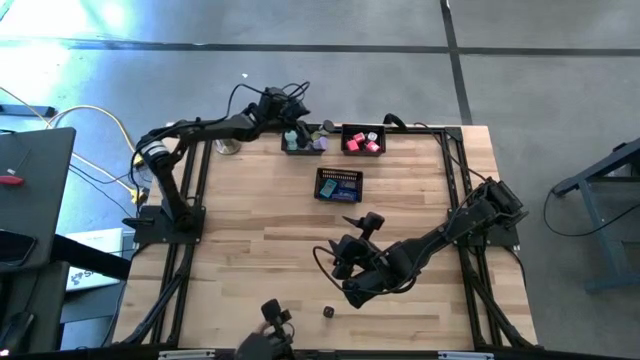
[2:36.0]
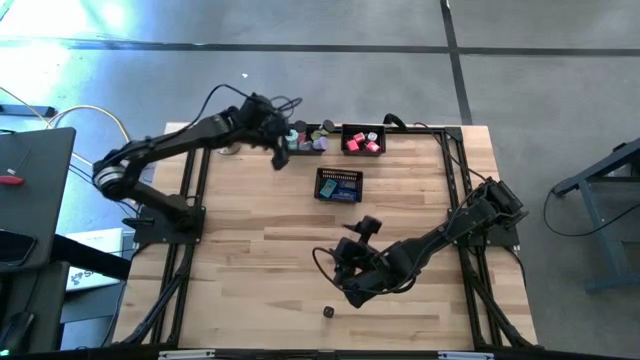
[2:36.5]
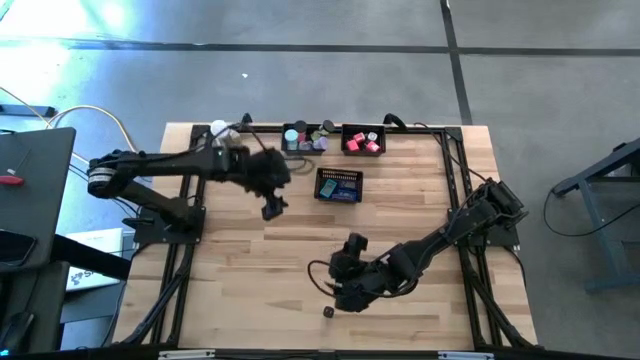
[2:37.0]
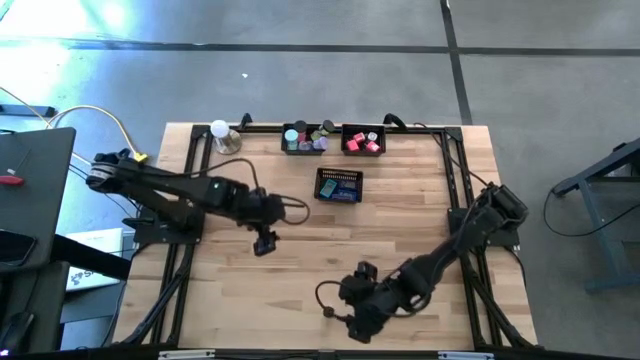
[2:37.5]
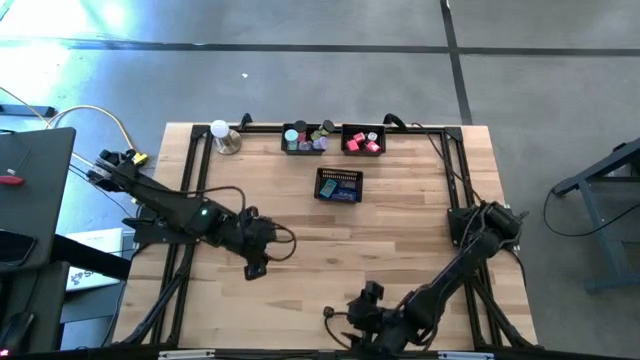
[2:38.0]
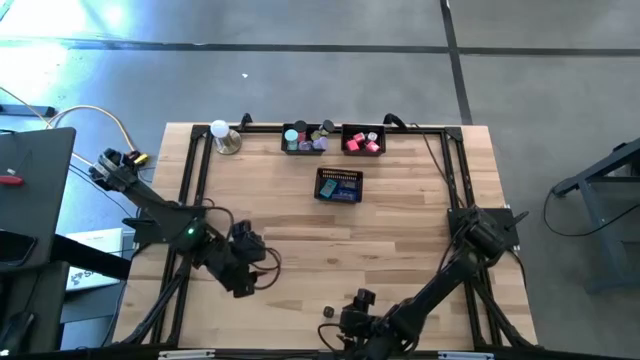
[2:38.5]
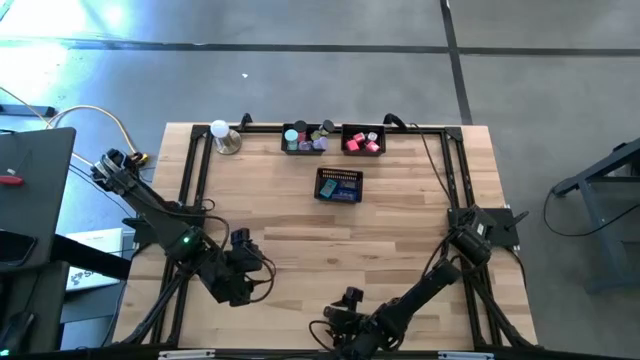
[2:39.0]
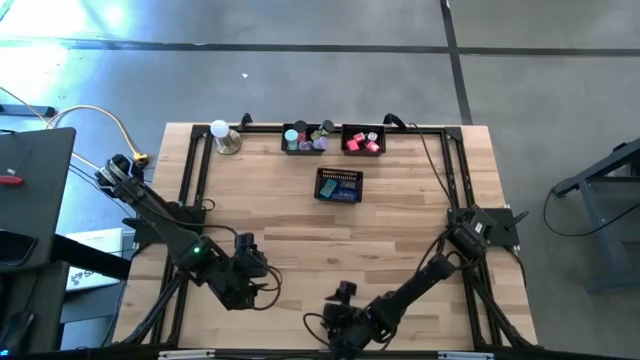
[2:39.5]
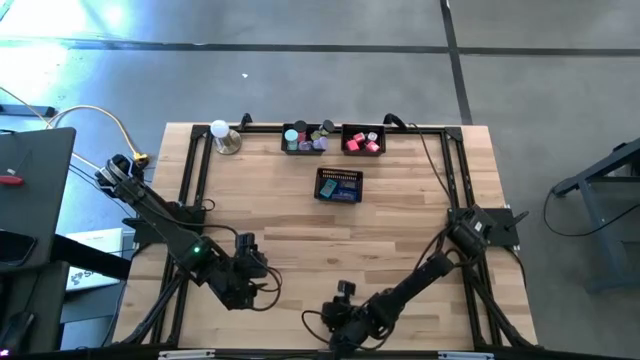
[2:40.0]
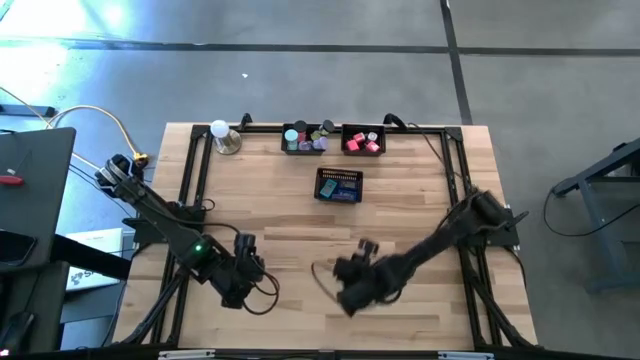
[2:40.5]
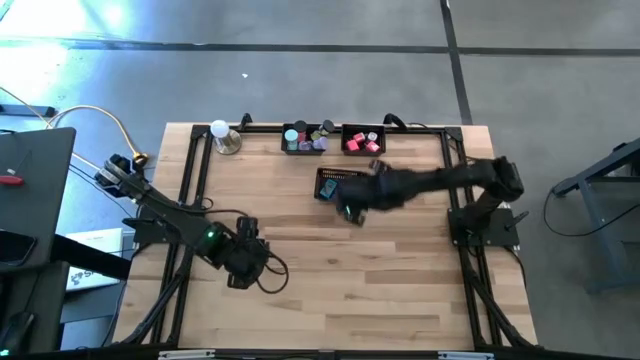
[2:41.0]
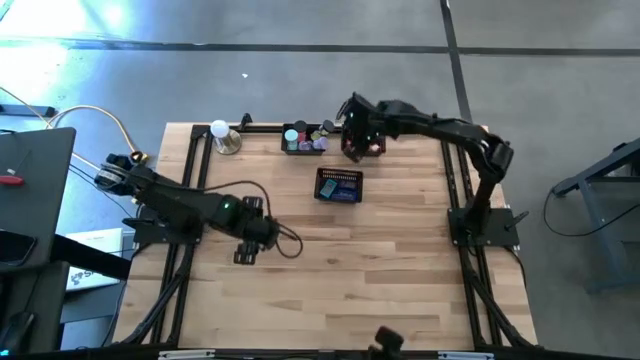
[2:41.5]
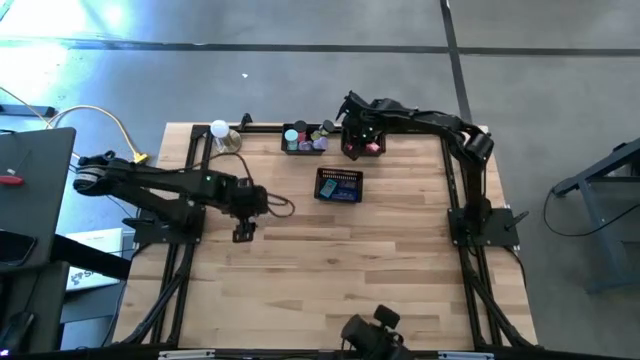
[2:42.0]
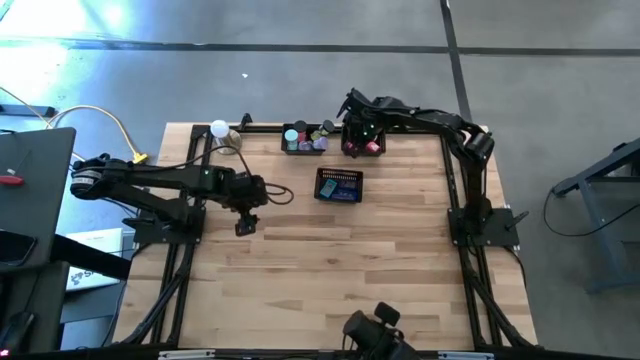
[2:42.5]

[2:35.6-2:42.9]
Task: Pick & Place Office items
Put the white black charger adapter into the top right black bin

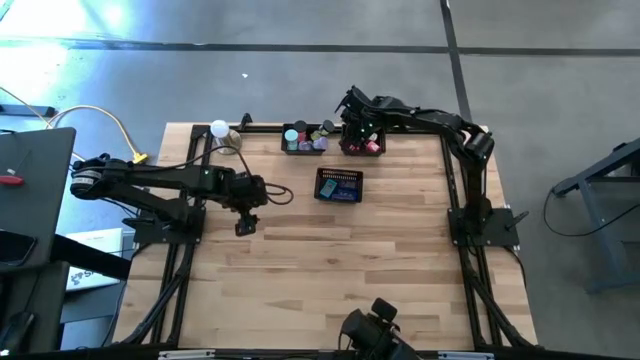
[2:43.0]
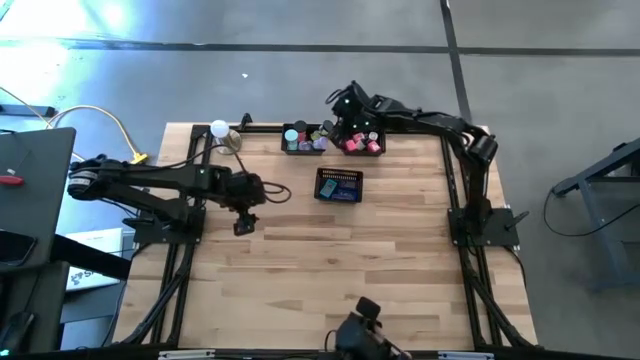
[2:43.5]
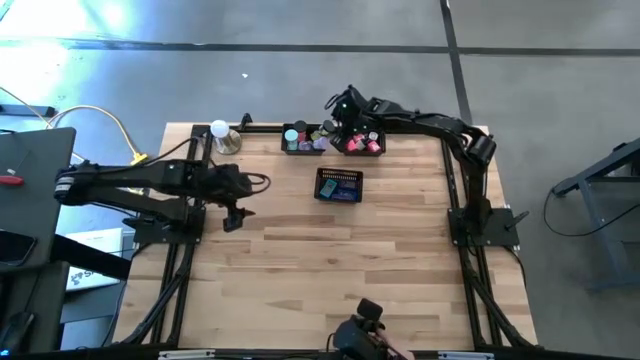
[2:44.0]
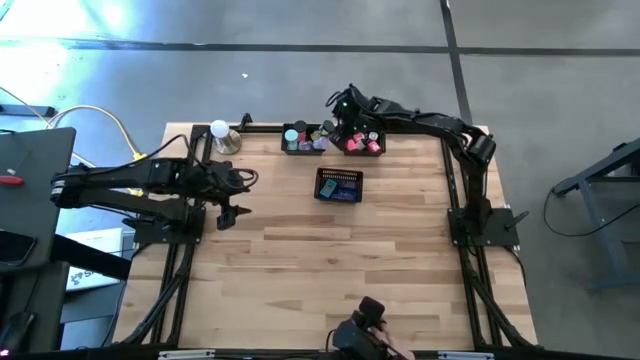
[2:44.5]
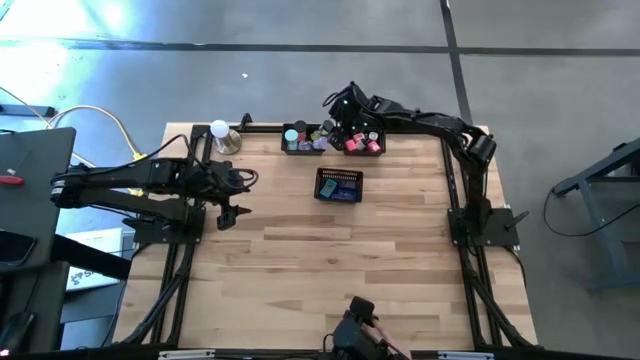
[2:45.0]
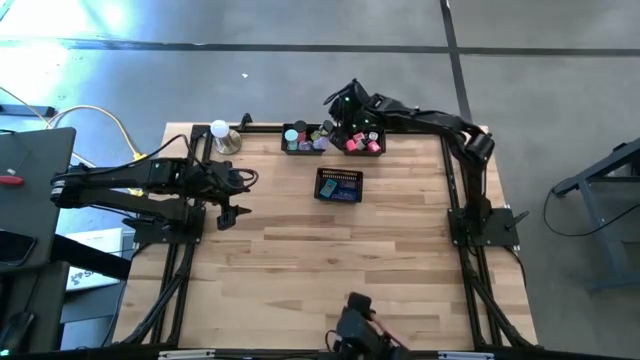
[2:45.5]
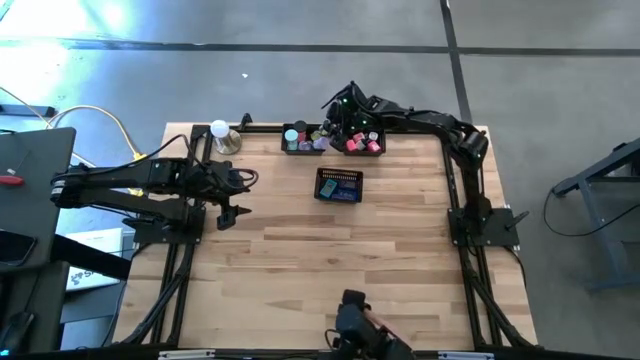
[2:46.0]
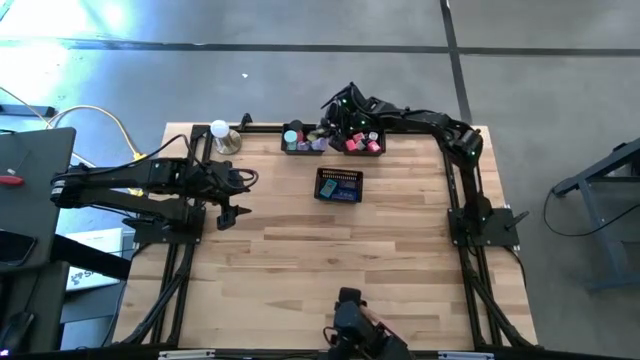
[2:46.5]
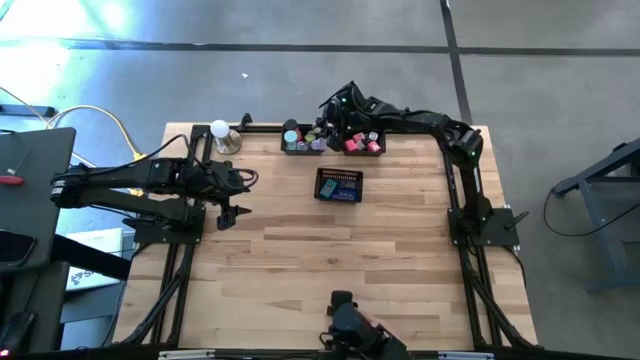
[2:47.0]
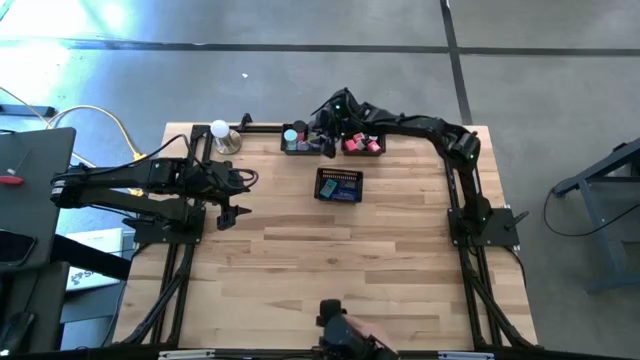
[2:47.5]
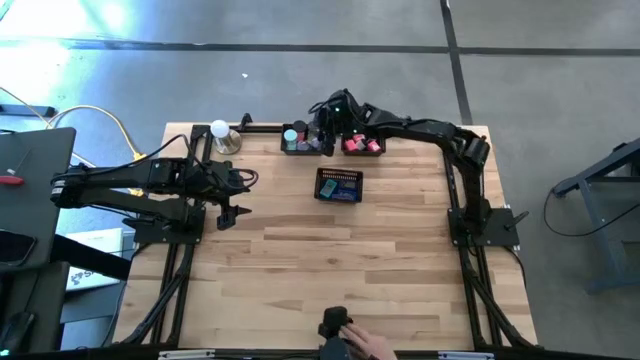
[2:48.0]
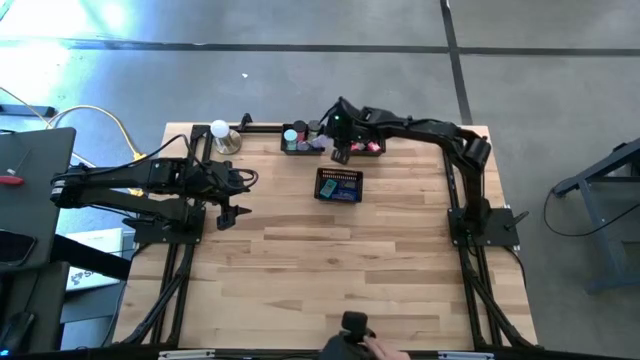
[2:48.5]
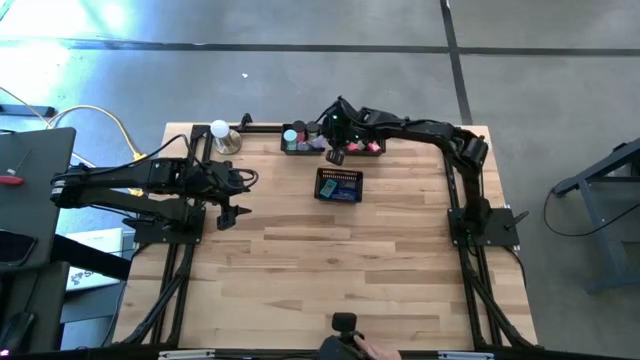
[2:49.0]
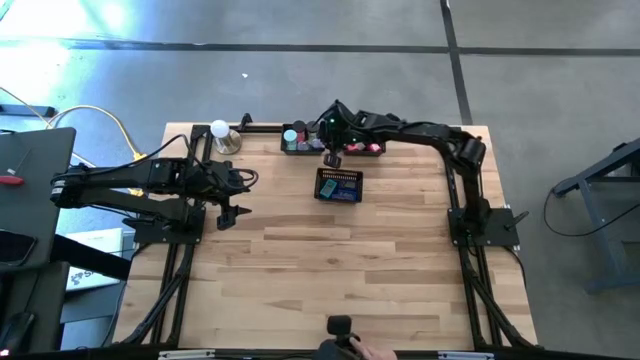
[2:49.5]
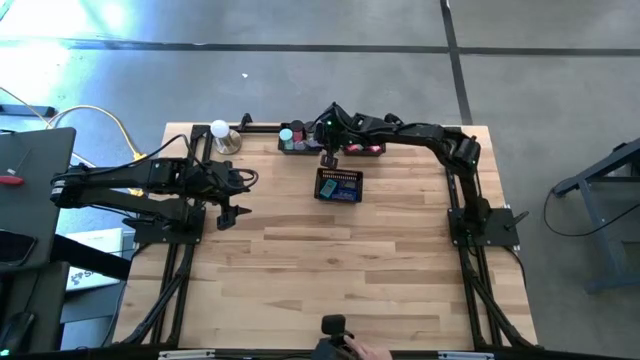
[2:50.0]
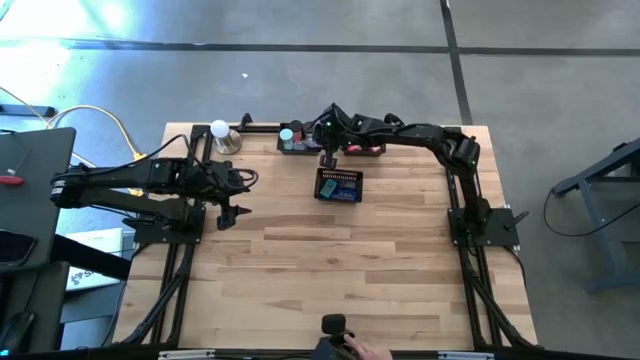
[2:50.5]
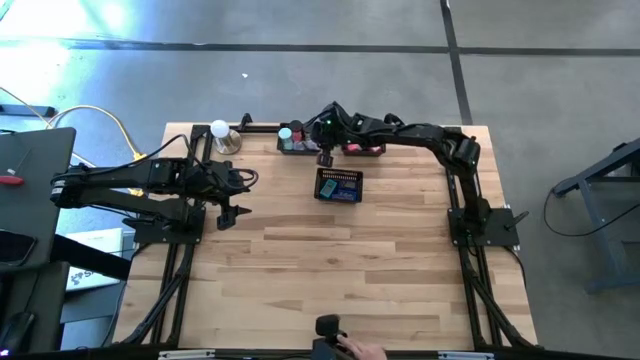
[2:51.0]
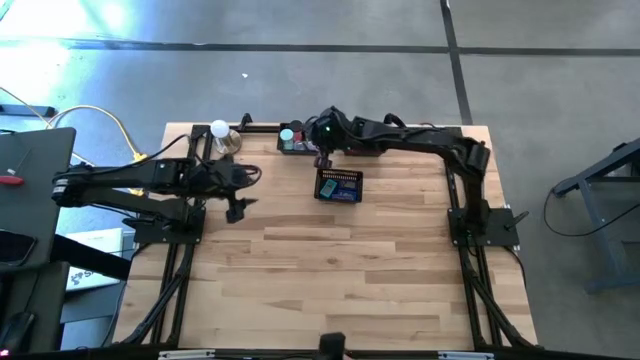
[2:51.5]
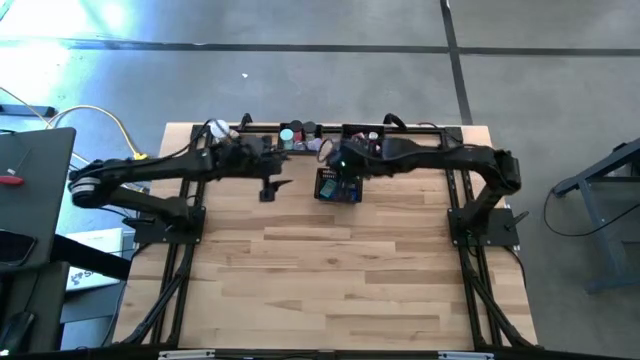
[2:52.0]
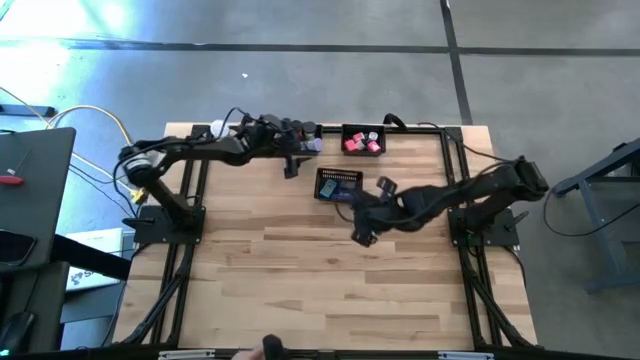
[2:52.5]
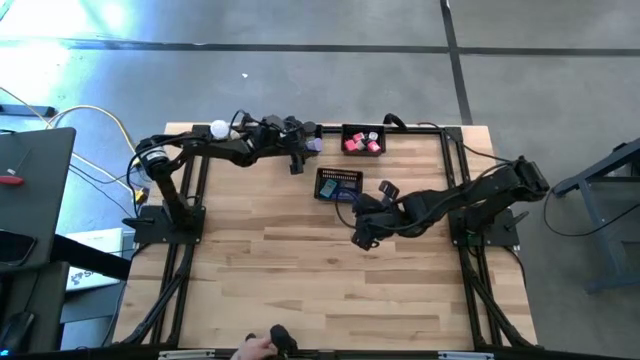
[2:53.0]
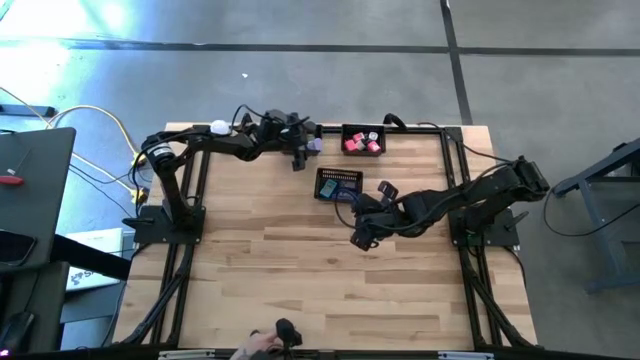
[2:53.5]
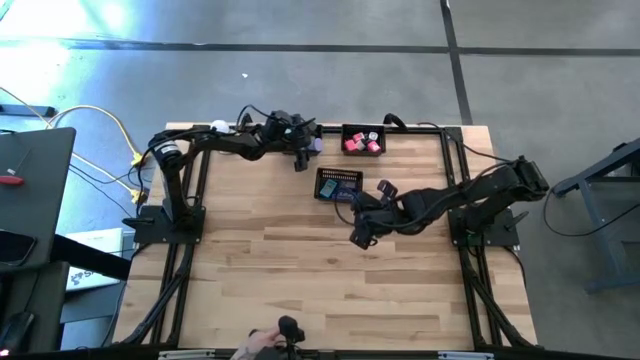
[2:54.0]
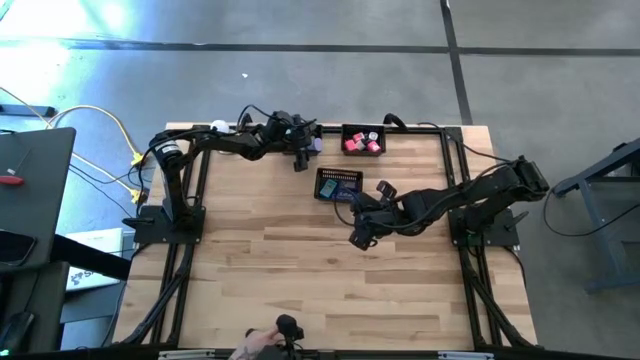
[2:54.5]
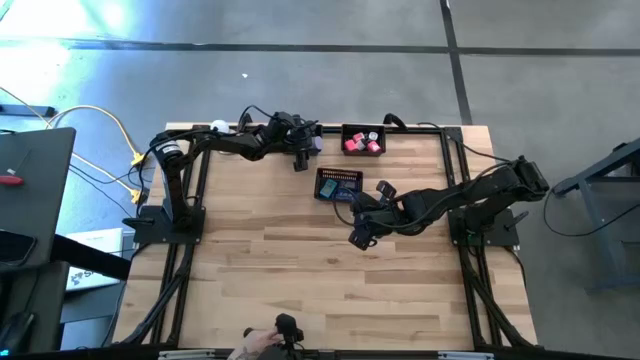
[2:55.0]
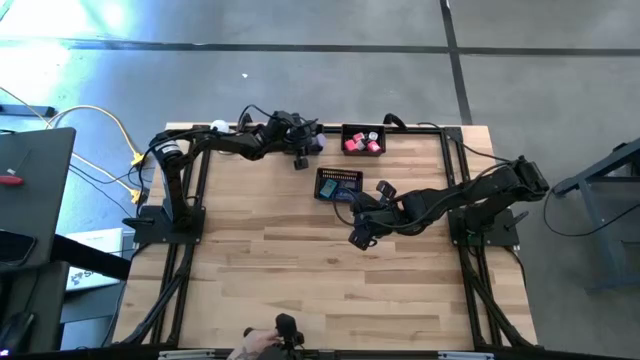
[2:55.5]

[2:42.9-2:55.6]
Adjust the hourglasses on the top left black bin

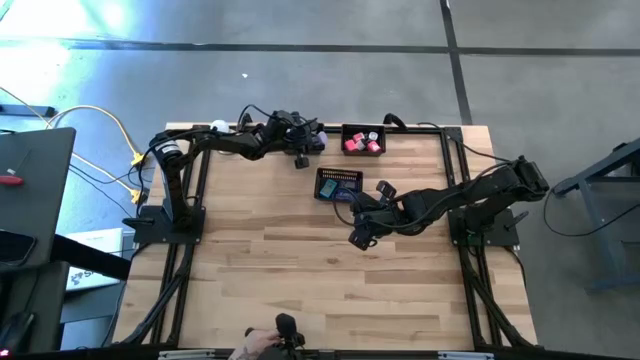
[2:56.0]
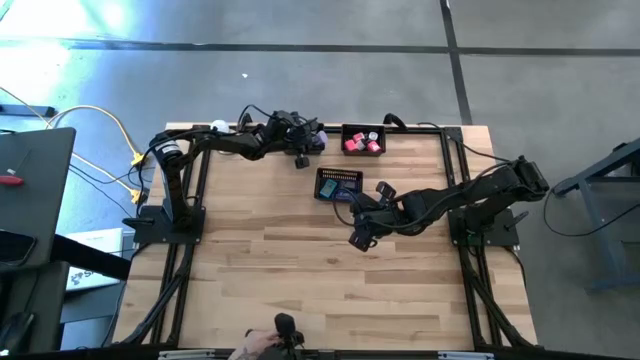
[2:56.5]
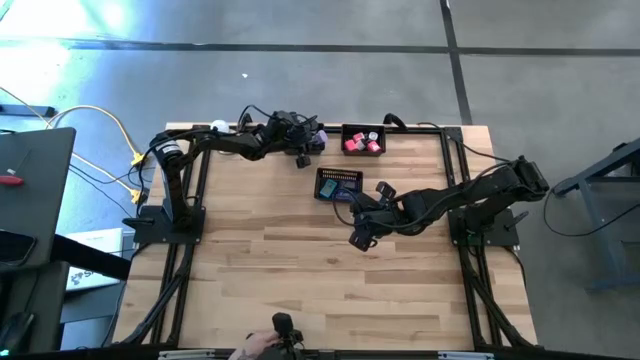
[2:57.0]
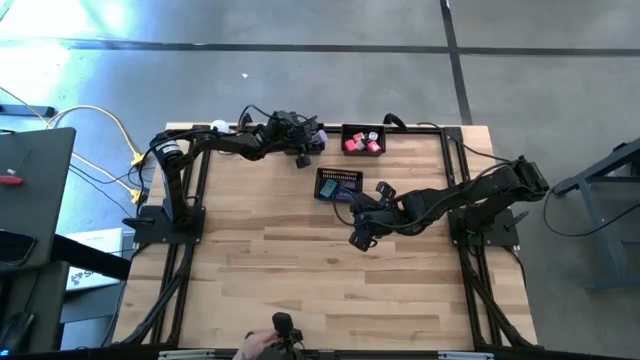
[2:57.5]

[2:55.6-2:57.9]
Adjust the hourglasses on the top left black bin
